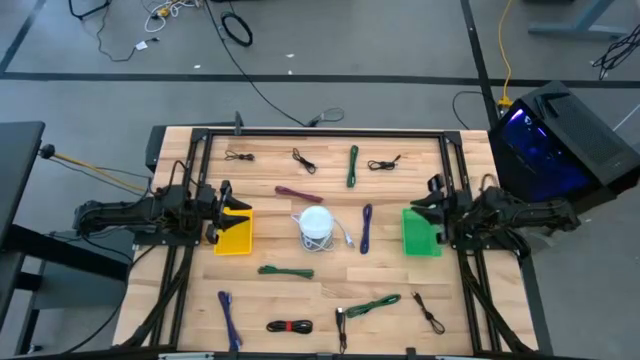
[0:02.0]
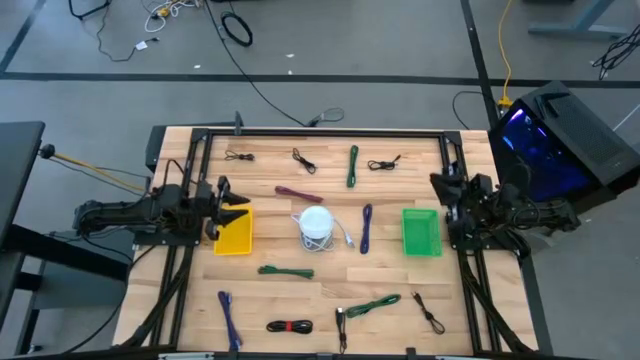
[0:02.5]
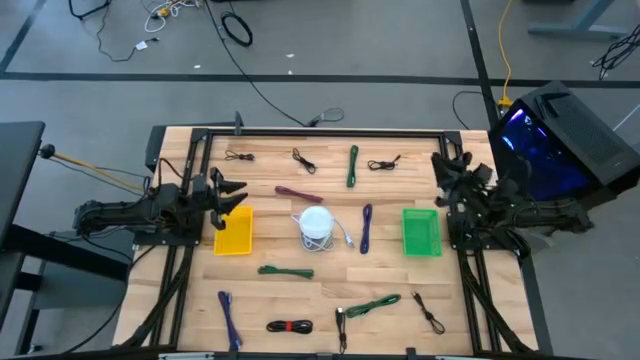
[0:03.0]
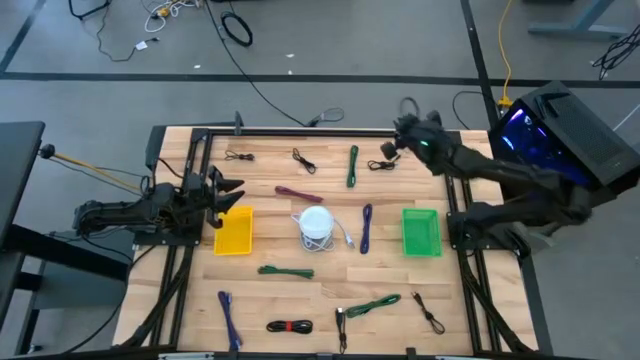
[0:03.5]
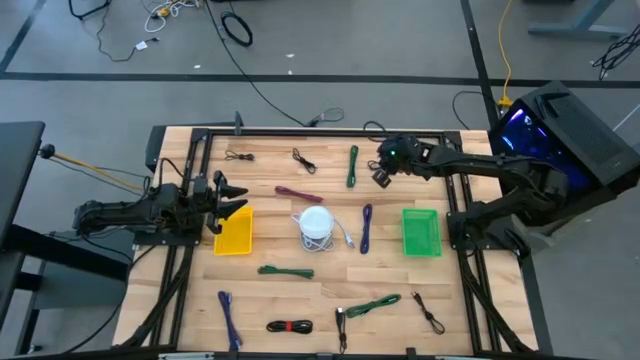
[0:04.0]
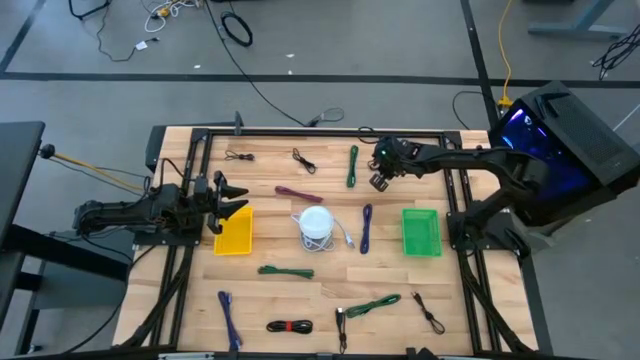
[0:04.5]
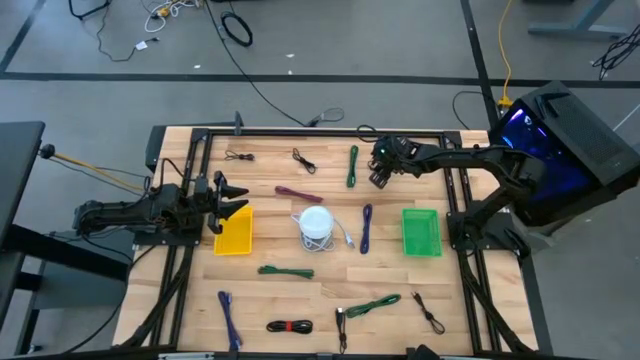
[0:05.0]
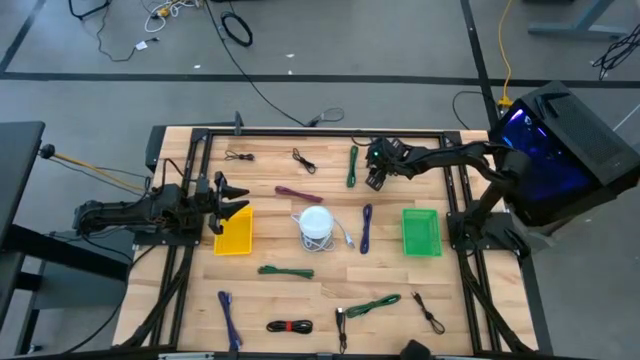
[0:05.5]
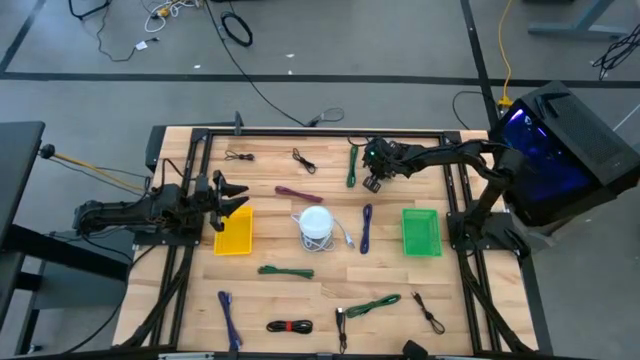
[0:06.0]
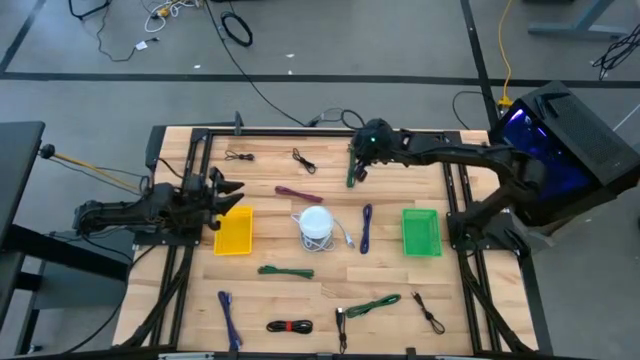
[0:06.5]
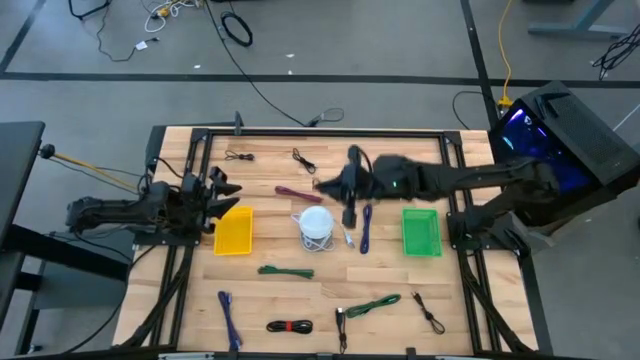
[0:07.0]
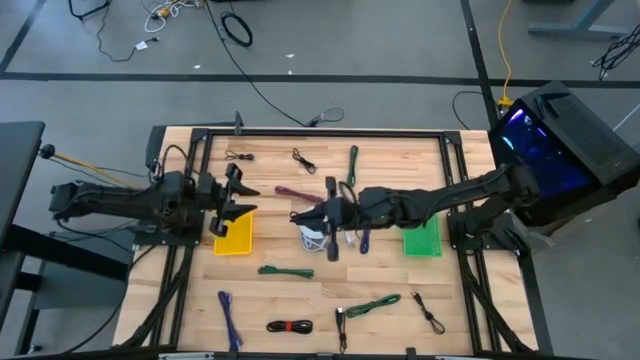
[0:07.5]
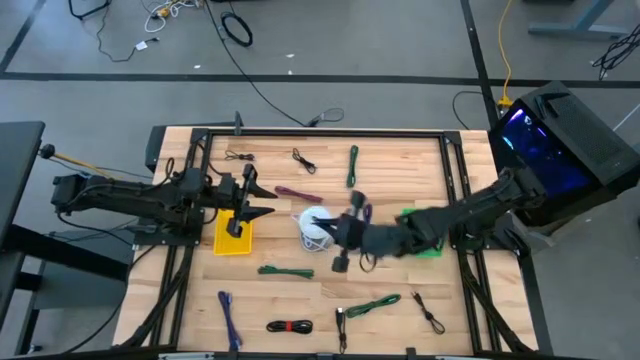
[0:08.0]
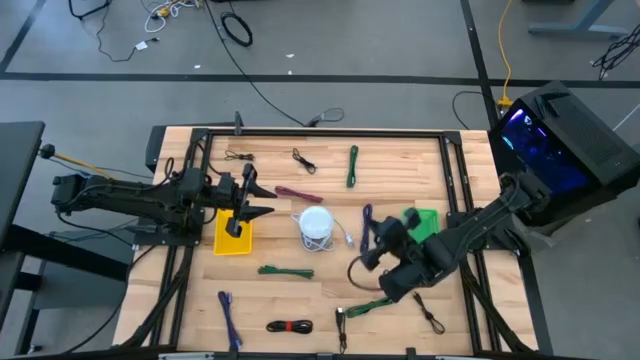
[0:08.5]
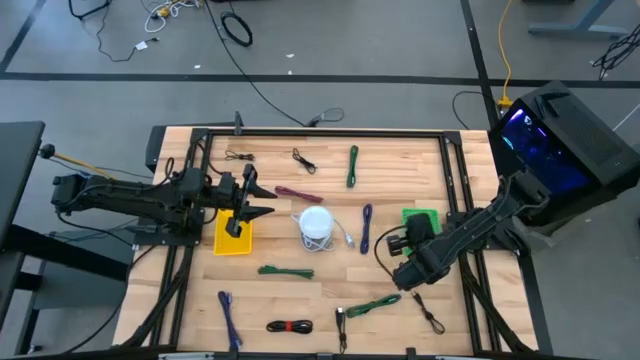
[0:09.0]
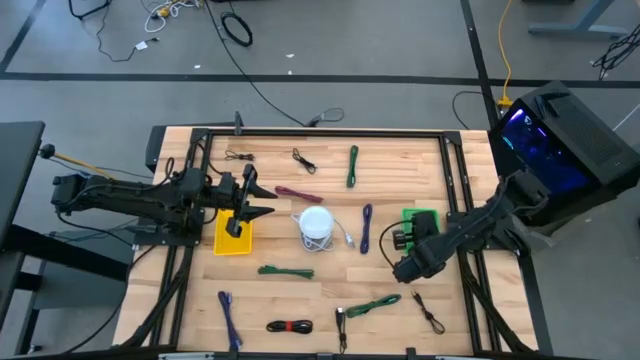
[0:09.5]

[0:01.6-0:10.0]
Task: Pick & Place USB Port
Put the black charger cable into the green bin

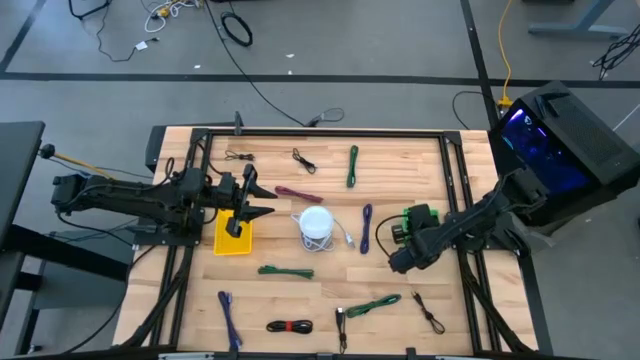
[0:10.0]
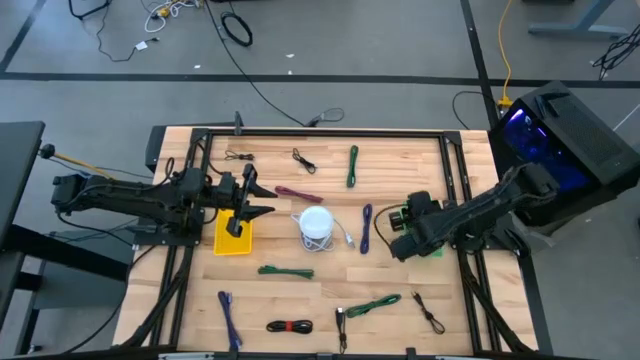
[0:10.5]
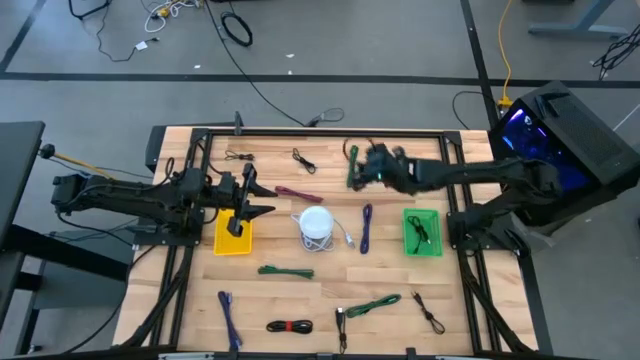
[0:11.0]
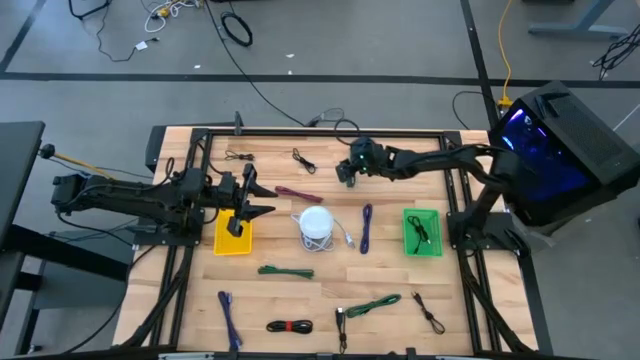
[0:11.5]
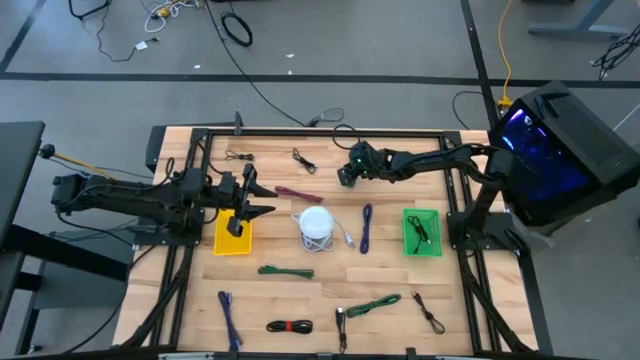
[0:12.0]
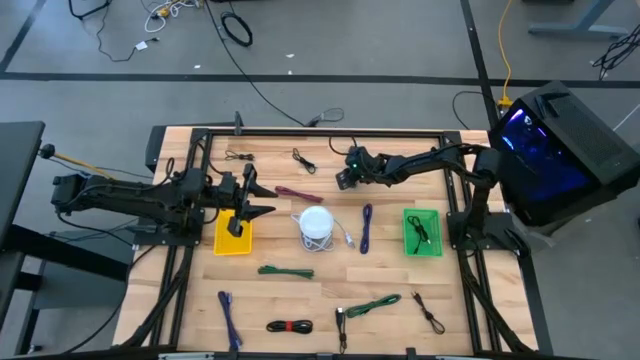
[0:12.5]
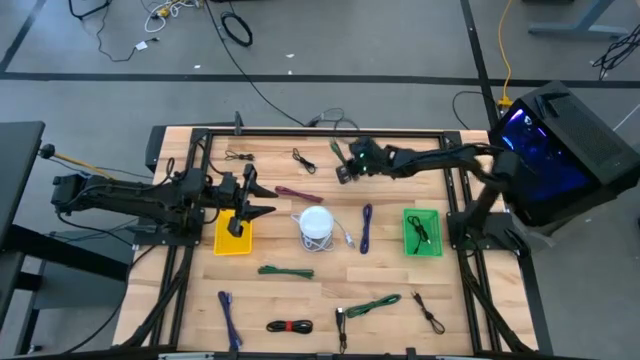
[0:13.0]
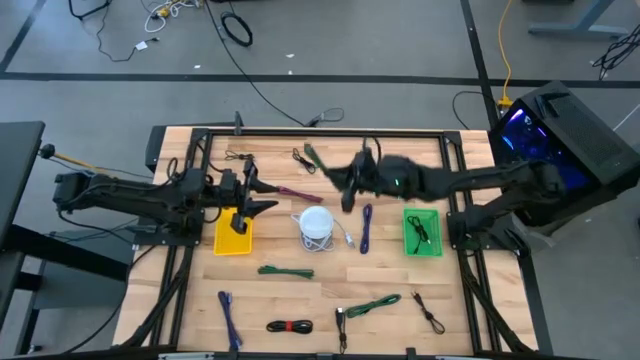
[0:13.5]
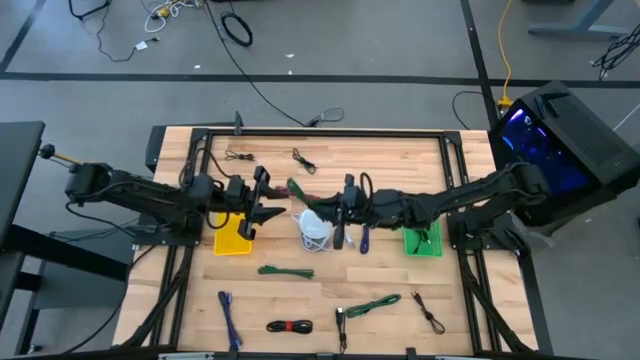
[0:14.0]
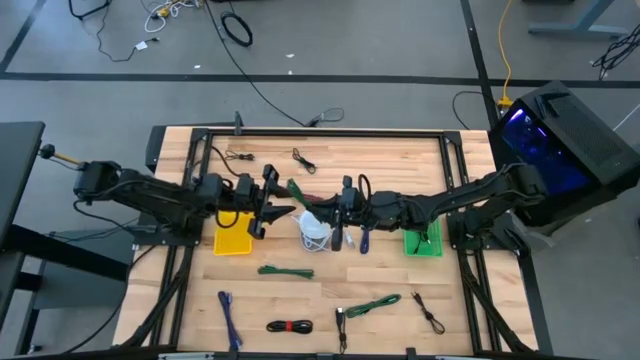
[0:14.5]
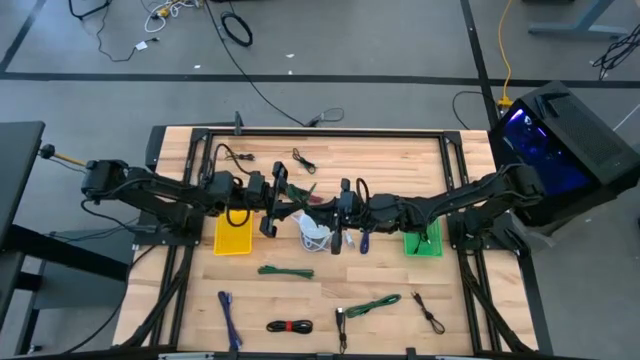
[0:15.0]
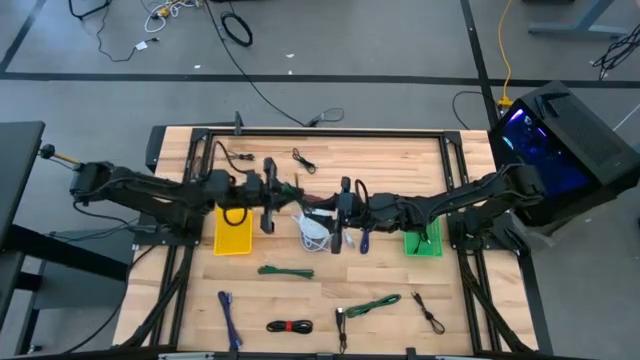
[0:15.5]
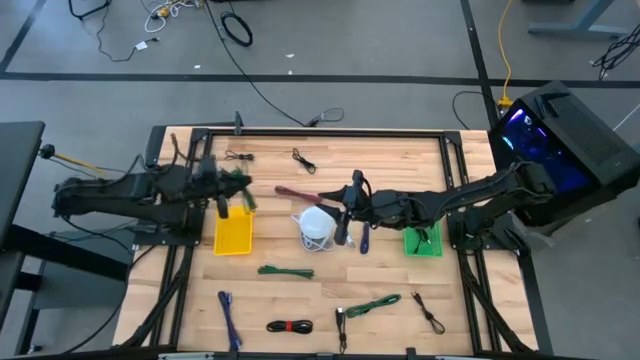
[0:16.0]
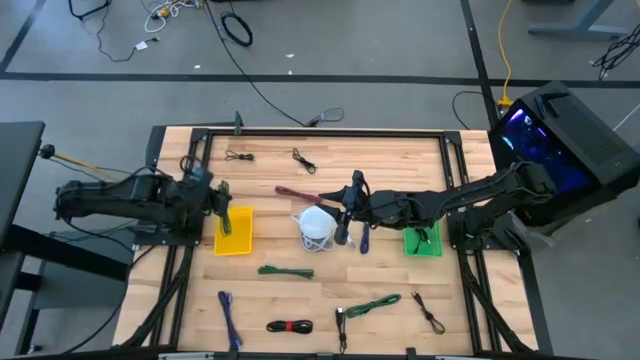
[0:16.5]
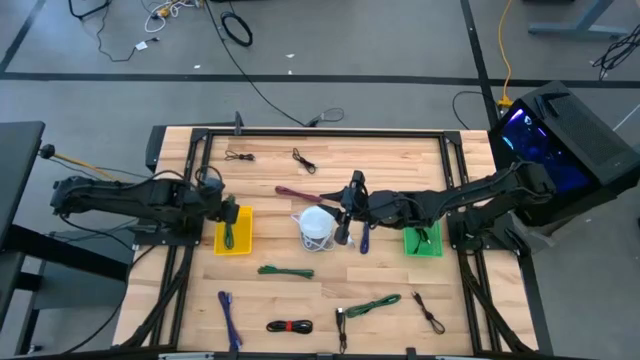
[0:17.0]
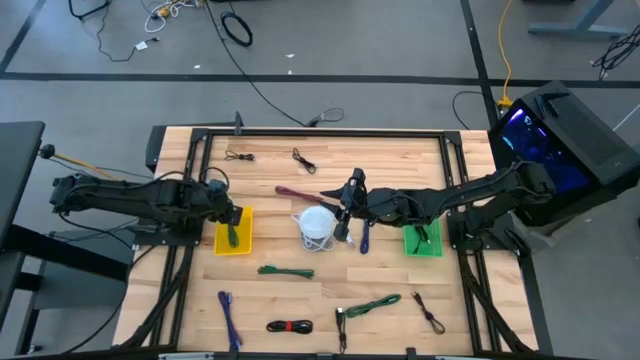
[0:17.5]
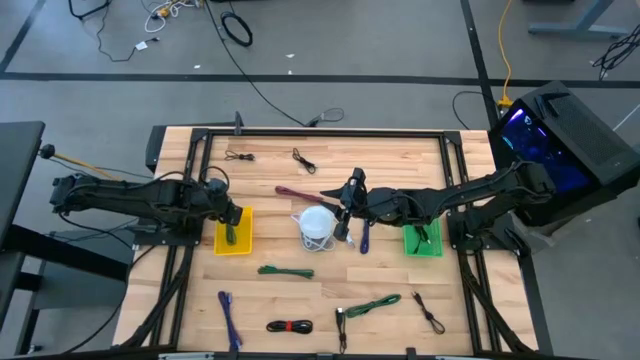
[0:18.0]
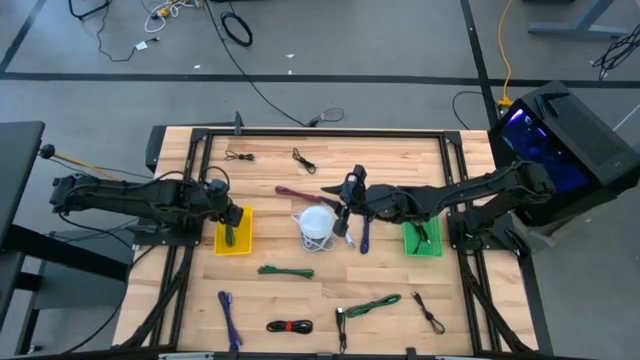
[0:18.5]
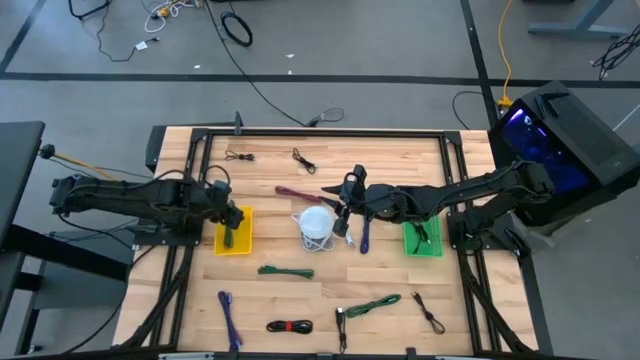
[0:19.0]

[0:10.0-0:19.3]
Put the green charger cable into the yellow bin

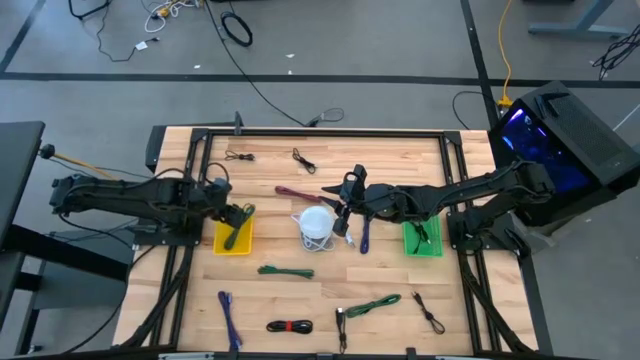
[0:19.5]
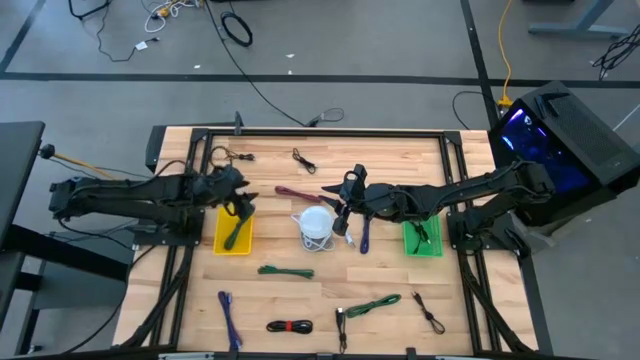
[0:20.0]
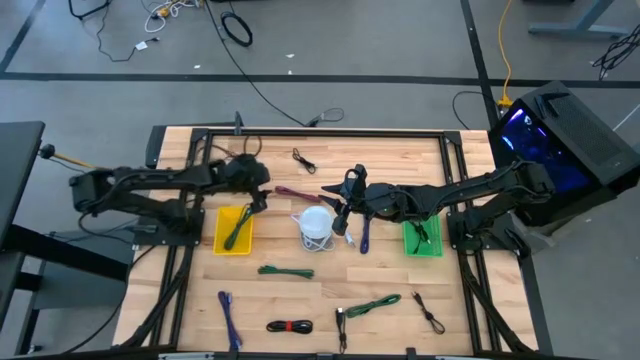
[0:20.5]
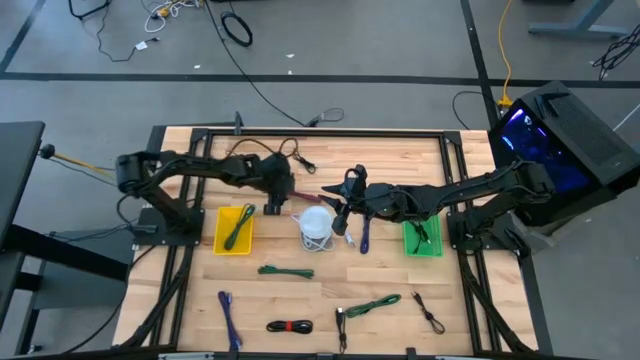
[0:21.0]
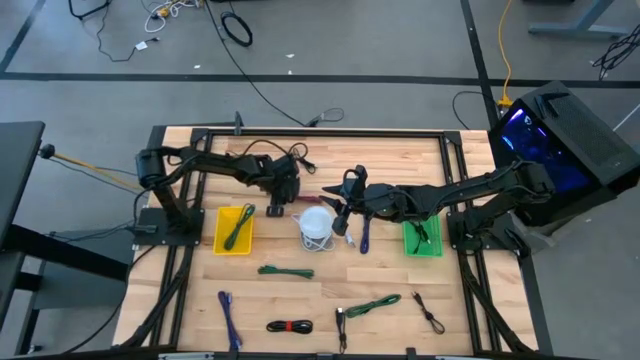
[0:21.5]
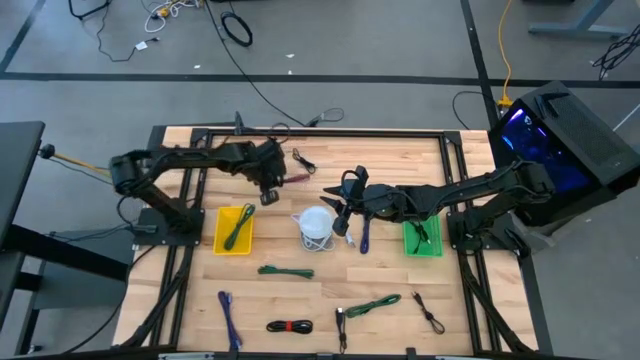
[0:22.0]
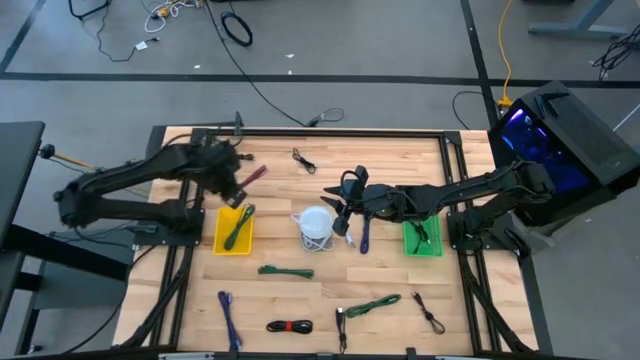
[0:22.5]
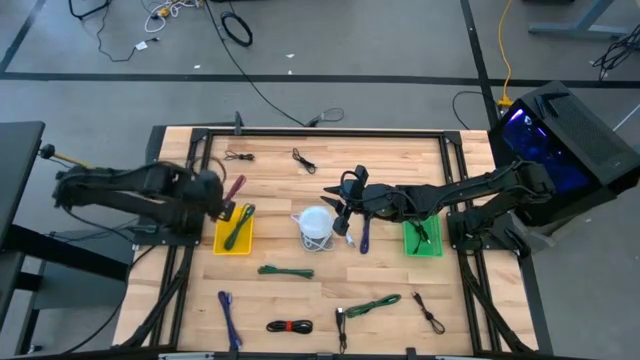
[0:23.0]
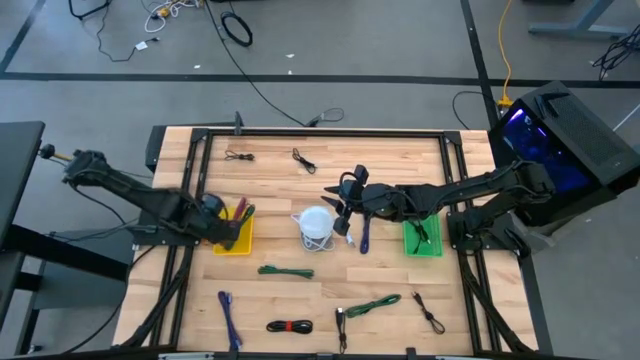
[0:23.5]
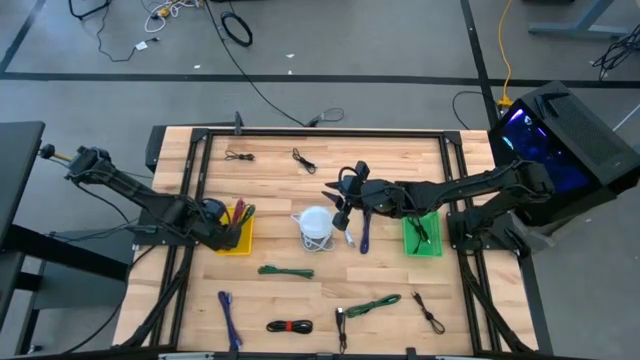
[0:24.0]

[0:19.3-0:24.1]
Put the pink charger cable into the yellow bin
